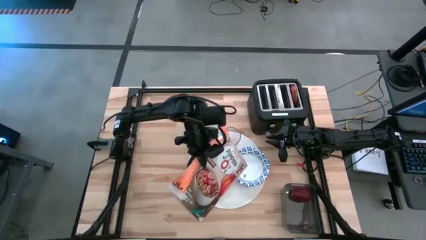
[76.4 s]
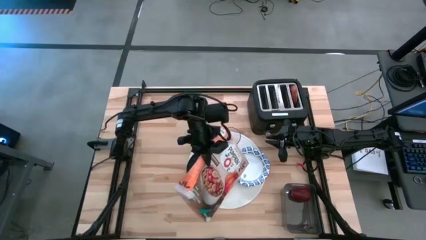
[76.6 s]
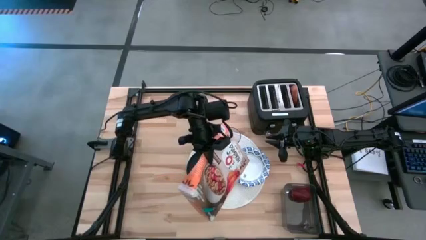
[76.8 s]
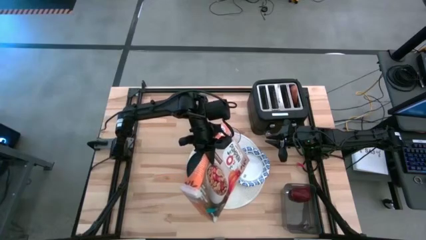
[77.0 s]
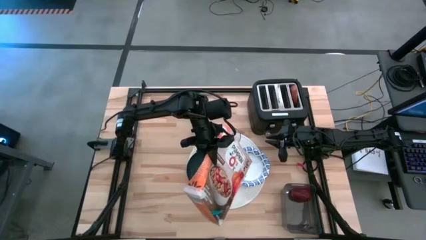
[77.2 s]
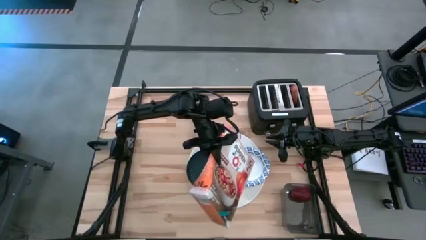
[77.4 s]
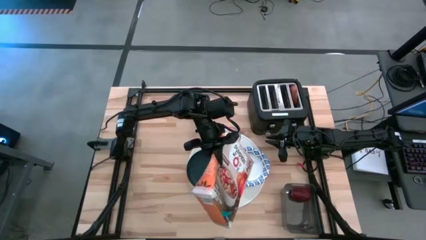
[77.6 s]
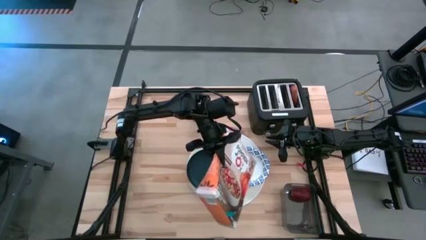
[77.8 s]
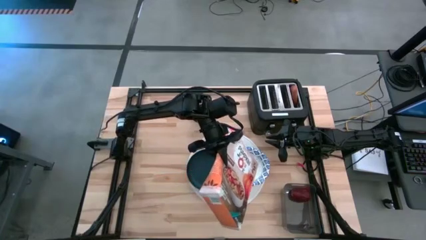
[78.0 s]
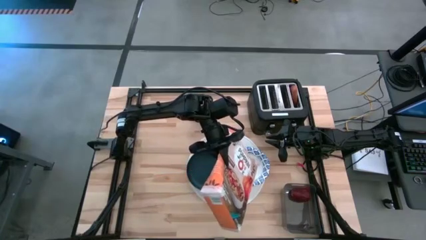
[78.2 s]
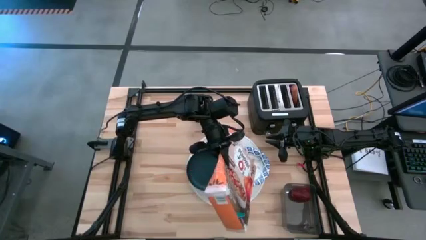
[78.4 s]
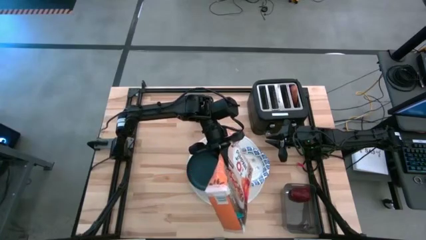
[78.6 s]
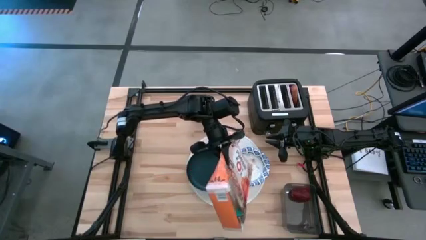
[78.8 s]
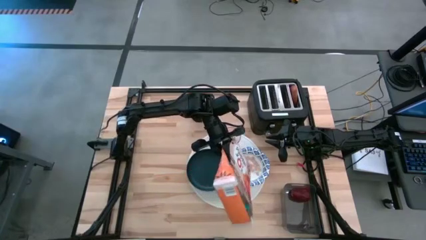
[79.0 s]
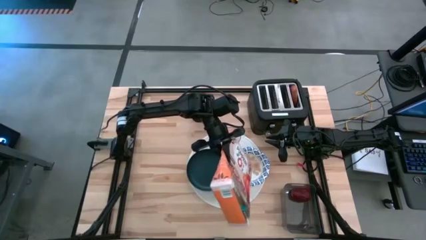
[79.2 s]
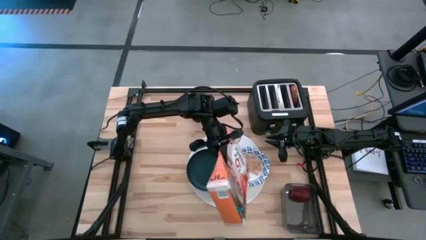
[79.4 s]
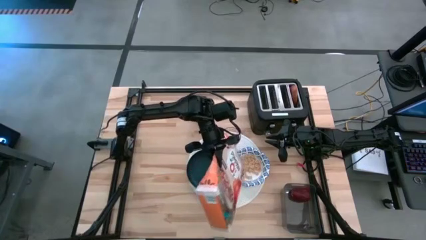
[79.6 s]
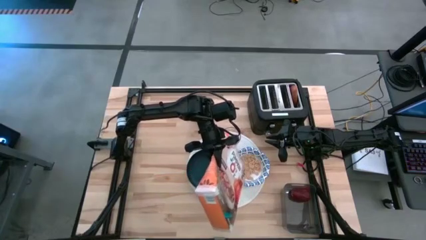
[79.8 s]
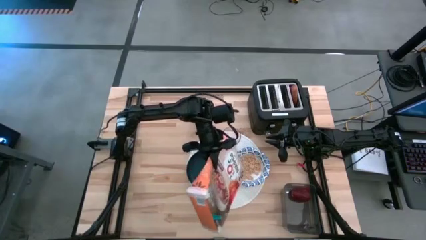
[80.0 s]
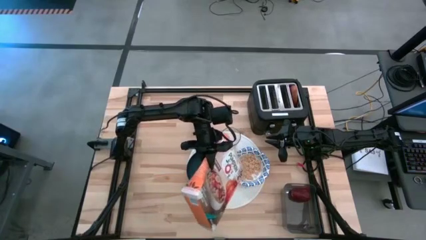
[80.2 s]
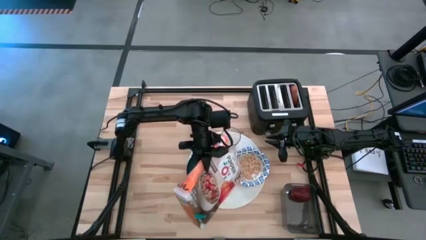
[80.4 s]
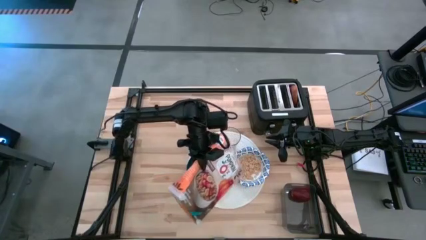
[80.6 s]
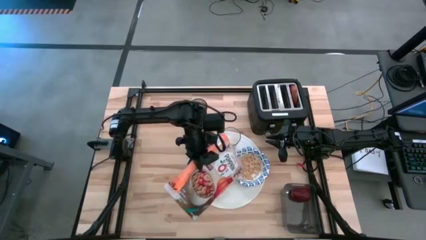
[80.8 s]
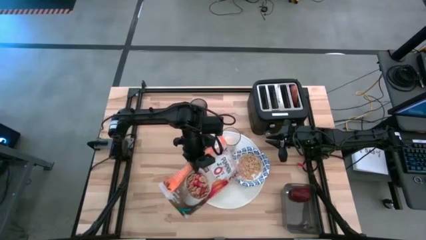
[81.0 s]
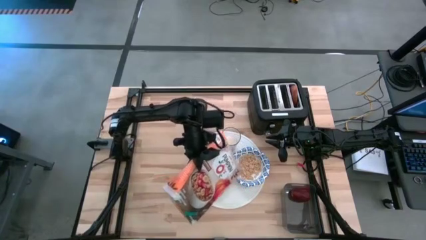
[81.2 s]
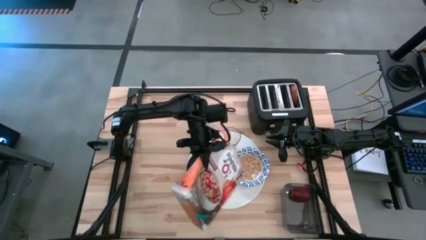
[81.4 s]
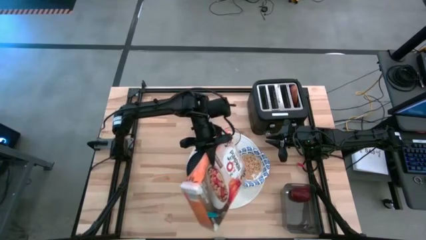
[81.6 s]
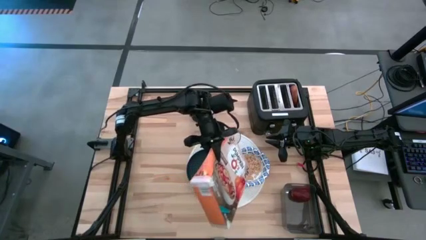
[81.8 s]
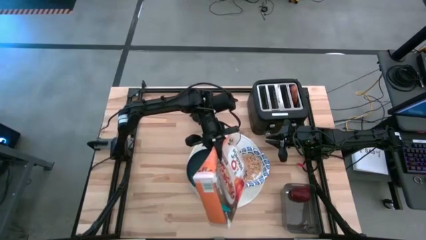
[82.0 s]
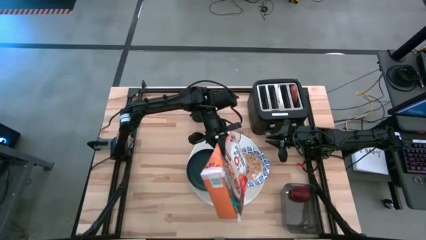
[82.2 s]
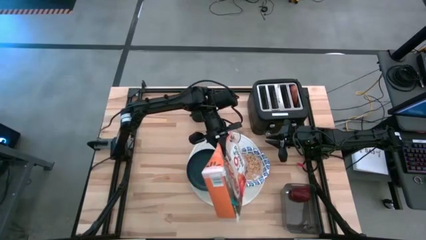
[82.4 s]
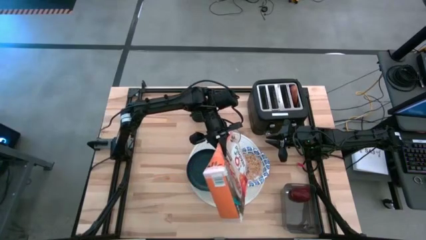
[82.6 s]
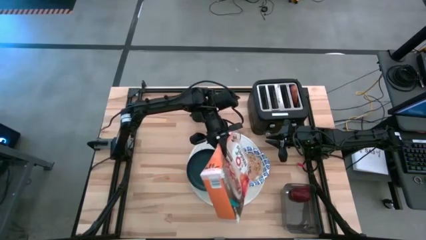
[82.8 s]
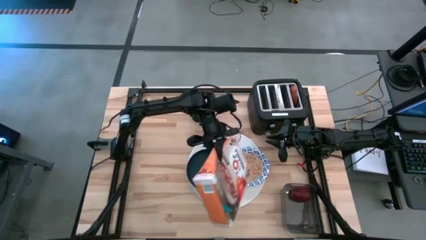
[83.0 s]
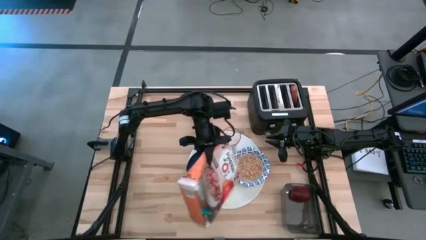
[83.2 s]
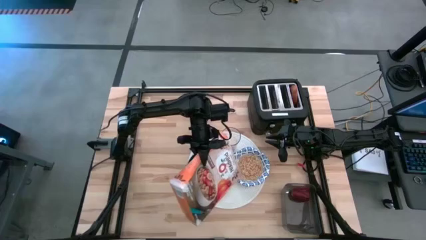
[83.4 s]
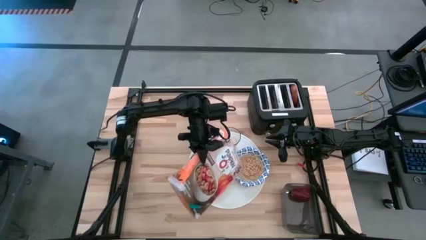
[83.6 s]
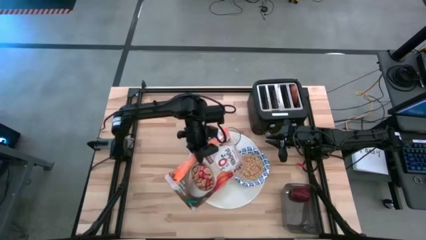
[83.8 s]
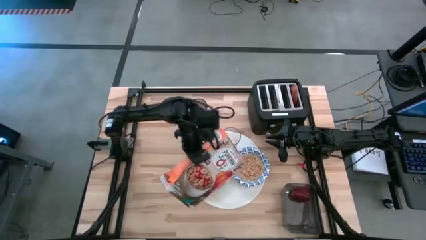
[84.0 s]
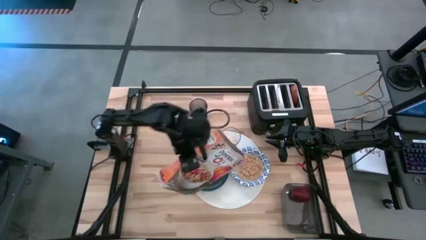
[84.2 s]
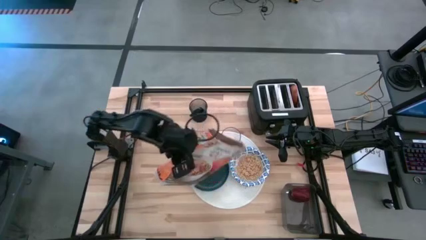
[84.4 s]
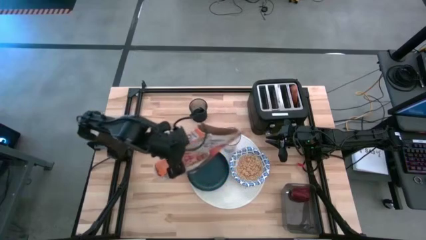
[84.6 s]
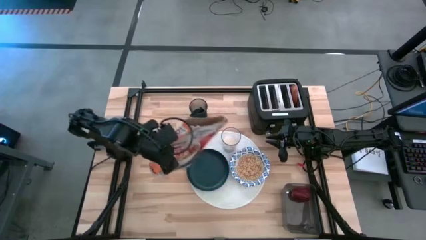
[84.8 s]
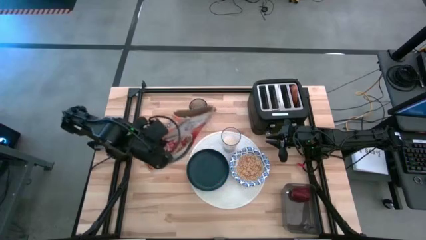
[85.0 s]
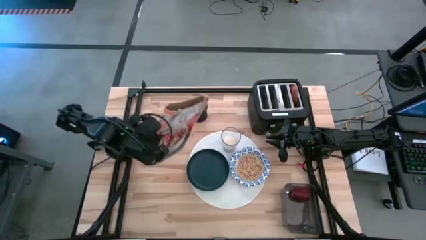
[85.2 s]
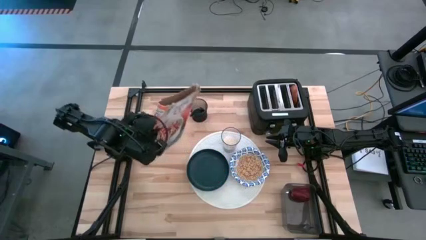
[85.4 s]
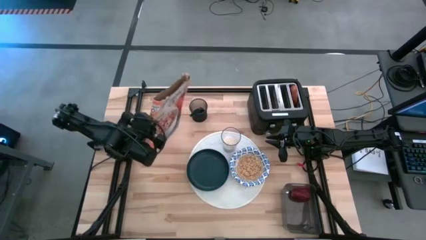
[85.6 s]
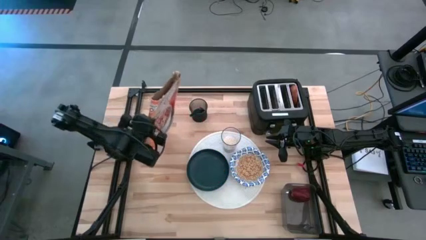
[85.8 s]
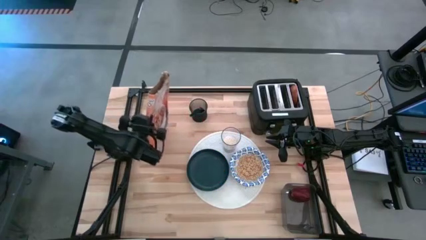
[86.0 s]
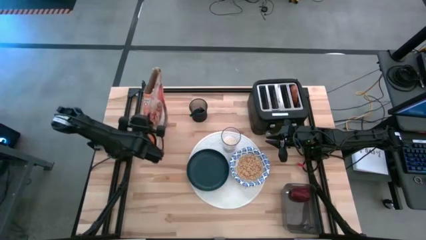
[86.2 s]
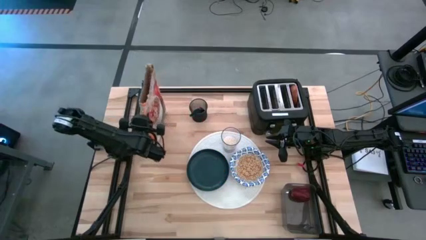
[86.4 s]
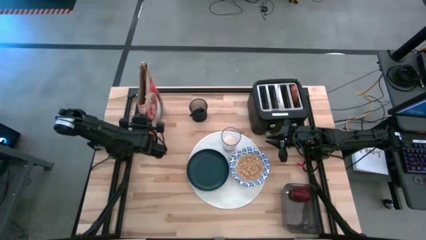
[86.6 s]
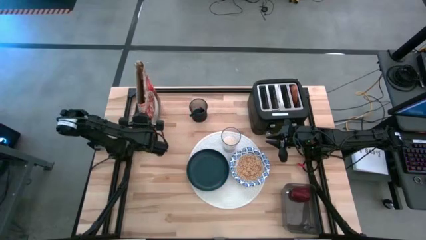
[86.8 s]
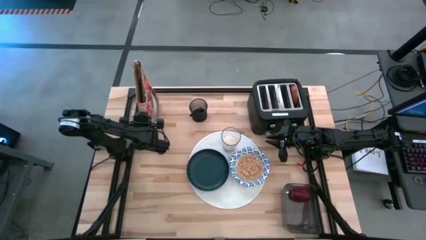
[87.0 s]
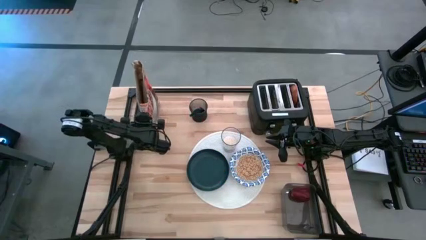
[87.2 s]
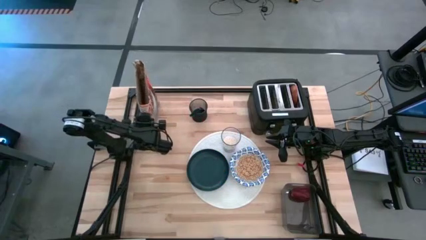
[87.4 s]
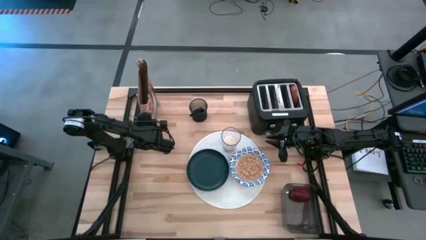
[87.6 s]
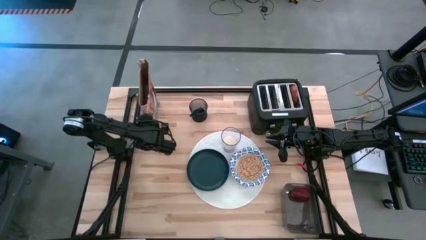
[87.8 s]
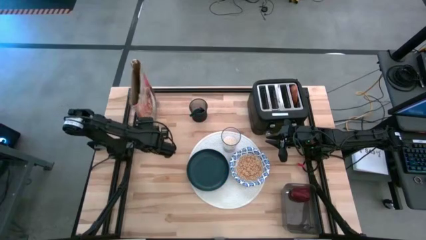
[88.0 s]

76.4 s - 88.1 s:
Task: Arrange a breakfast setting
Pour the cereal from the cereal box into the white patterned bowl

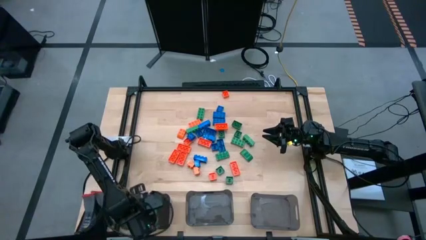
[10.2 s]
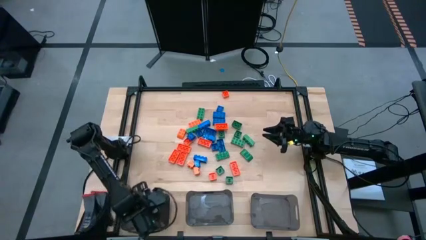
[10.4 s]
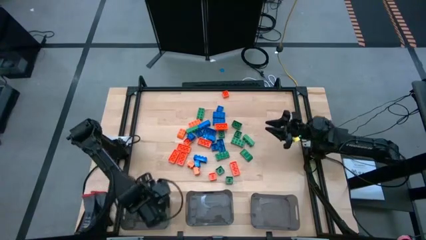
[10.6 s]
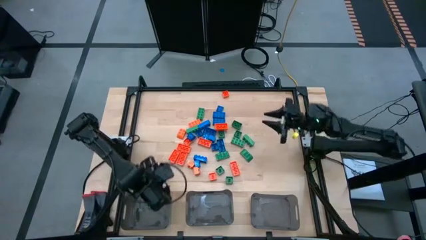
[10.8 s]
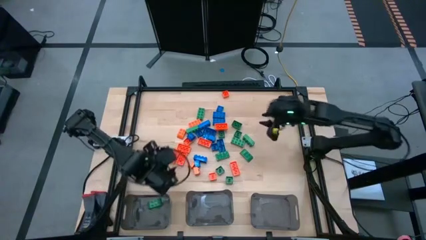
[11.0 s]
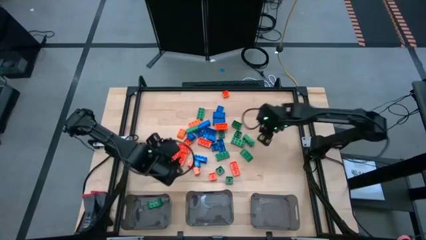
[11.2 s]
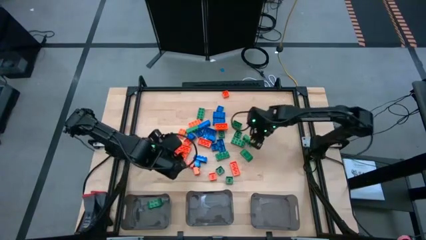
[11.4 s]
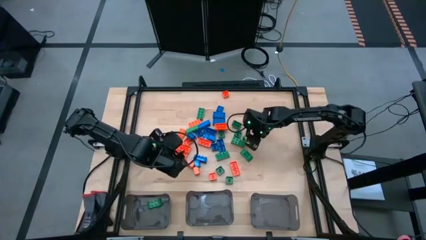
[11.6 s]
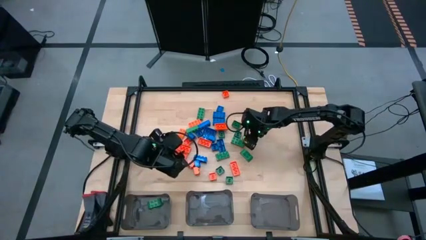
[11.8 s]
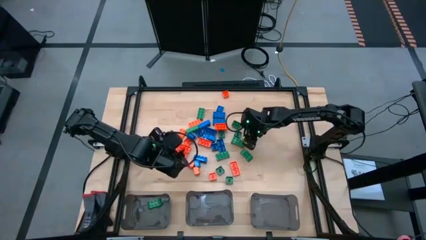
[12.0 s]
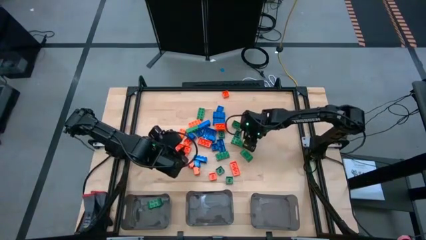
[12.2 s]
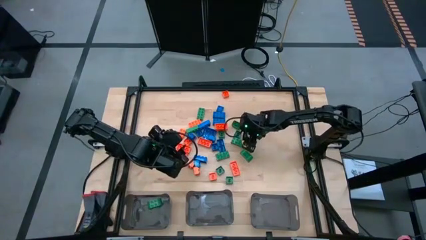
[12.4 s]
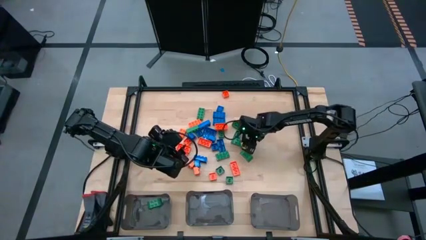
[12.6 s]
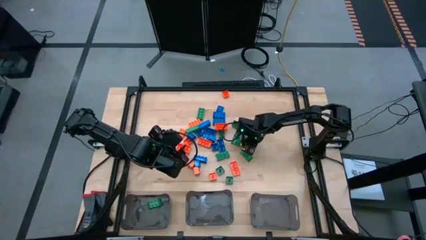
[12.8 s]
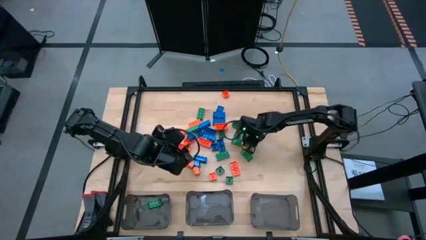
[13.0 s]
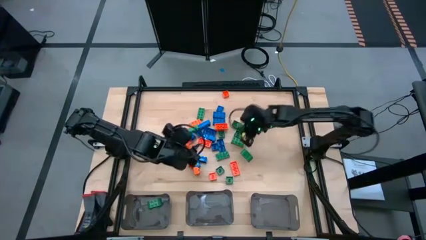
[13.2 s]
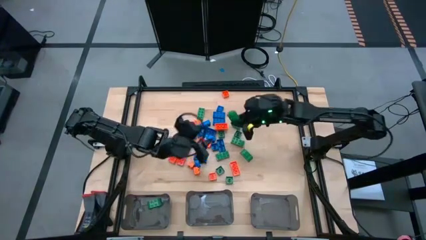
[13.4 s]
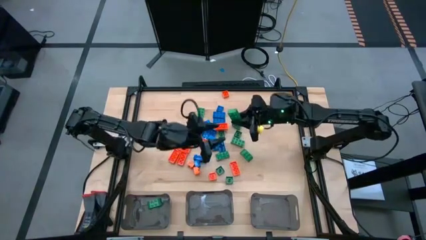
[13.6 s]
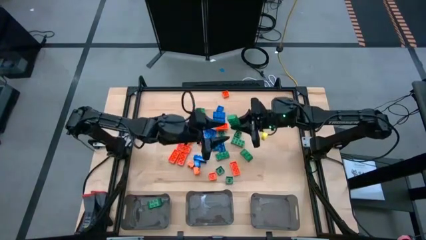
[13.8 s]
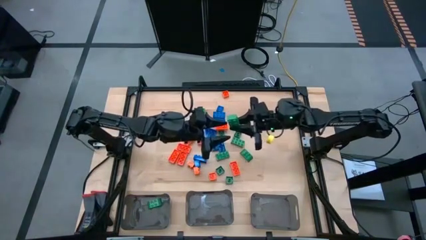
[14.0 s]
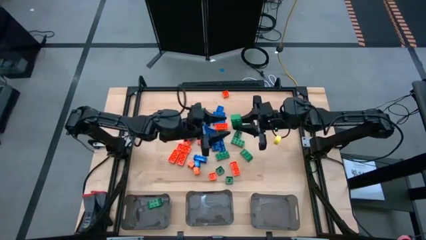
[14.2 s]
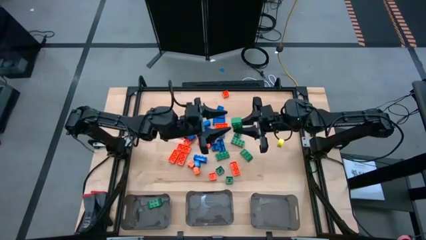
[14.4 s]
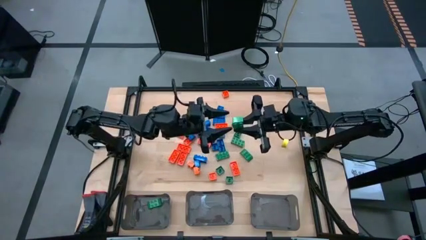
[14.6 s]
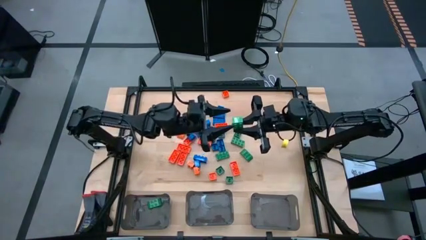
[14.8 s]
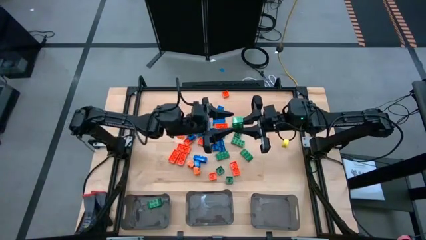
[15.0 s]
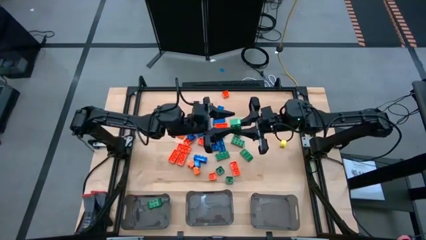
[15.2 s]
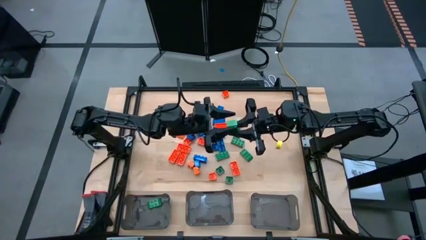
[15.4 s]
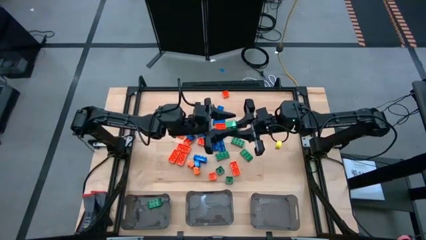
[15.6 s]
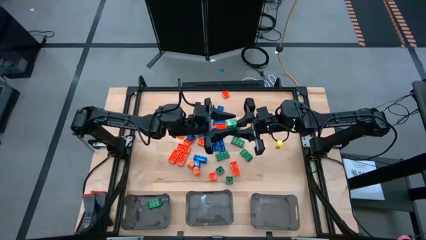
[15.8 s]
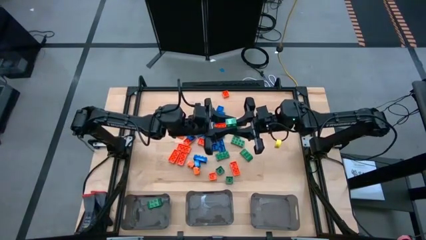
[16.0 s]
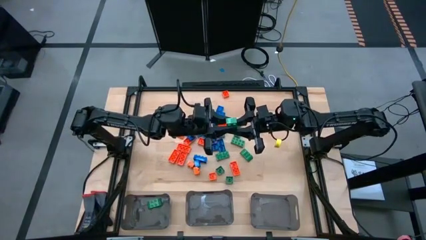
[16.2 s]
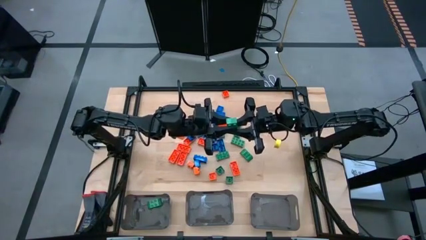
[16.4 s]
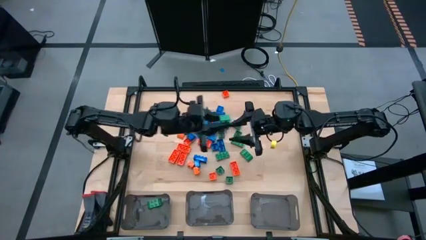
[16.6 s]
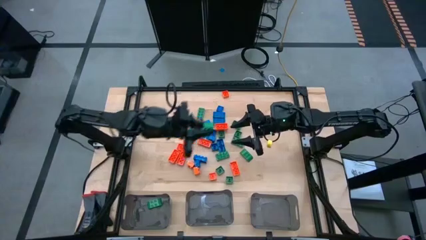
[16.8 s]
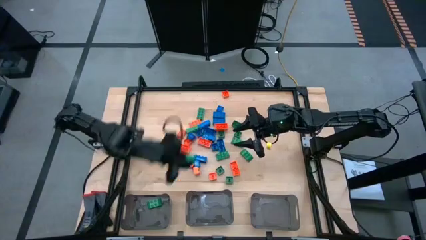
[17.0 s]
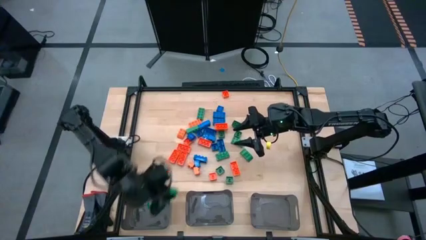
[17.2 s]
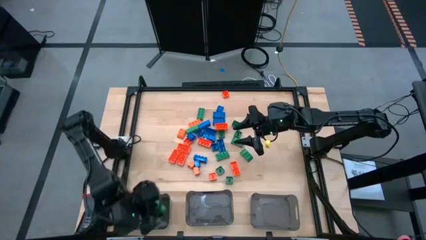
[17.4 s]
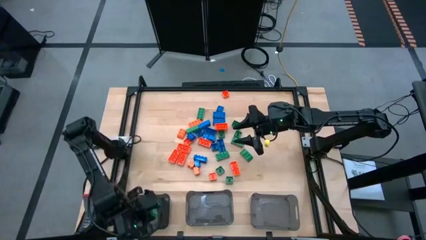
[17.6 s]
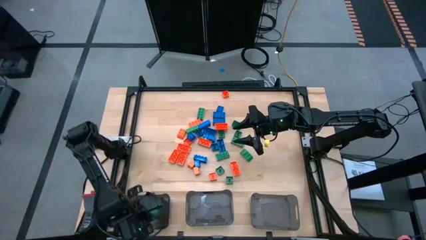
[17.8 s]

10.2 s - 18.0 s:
Task: Sort blocks
Put the green game piece into the left black bin
